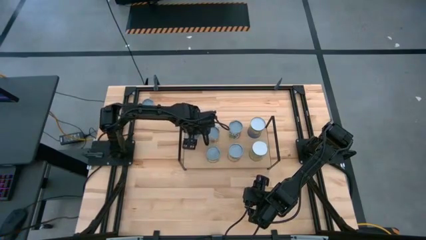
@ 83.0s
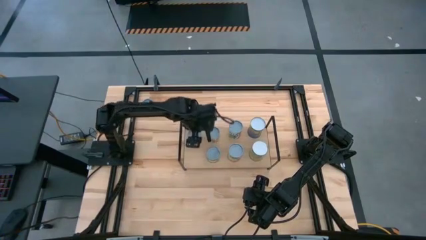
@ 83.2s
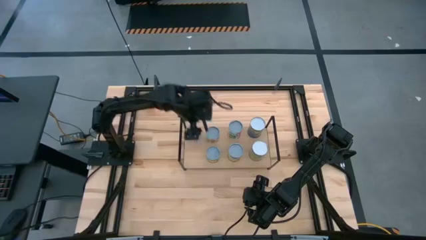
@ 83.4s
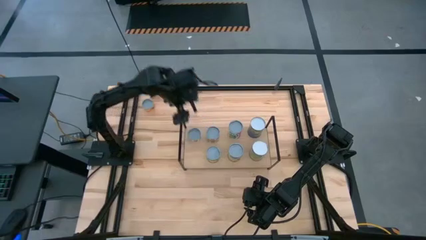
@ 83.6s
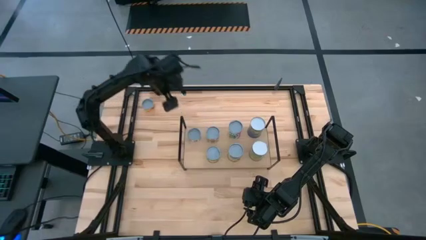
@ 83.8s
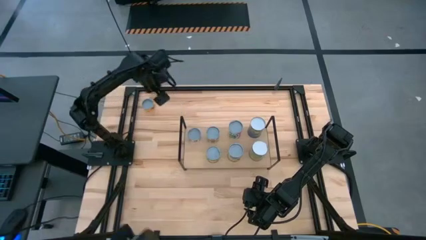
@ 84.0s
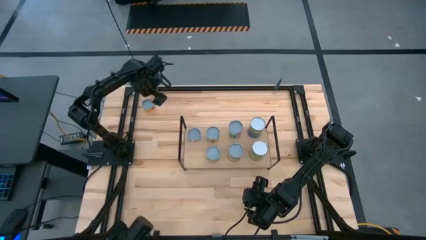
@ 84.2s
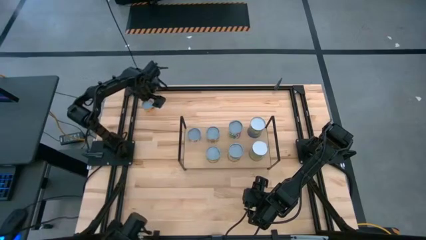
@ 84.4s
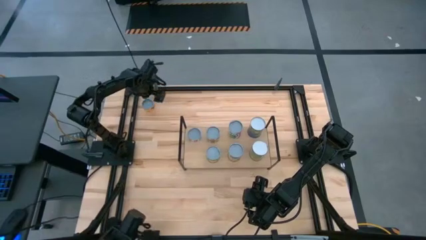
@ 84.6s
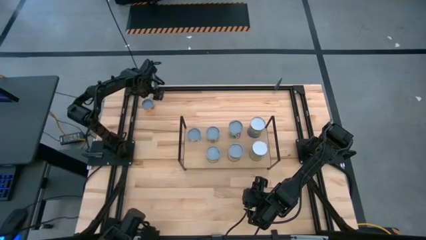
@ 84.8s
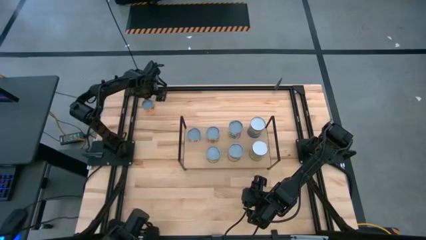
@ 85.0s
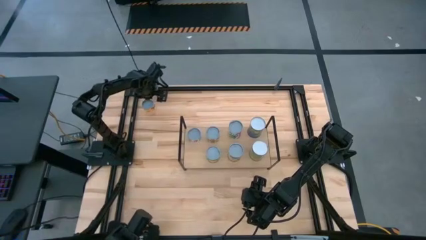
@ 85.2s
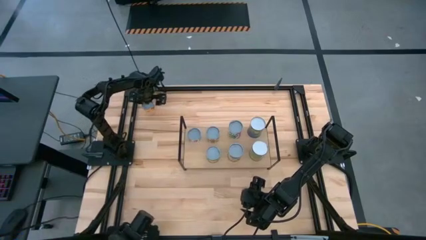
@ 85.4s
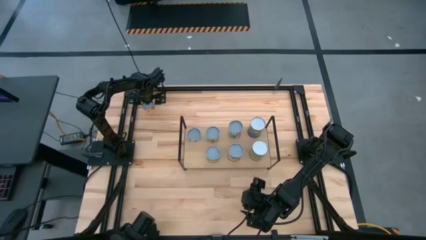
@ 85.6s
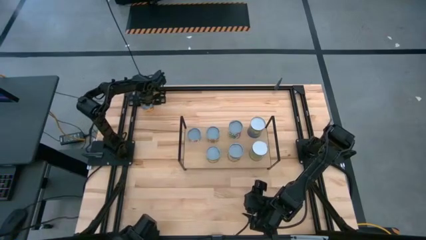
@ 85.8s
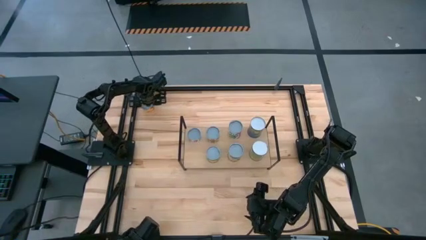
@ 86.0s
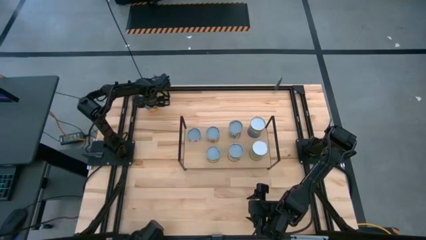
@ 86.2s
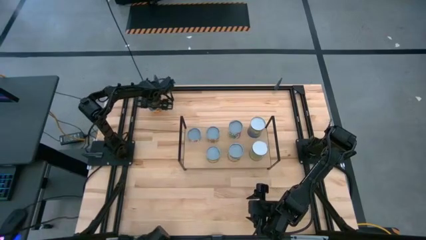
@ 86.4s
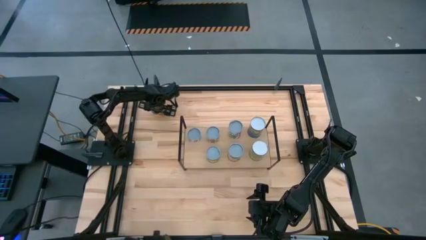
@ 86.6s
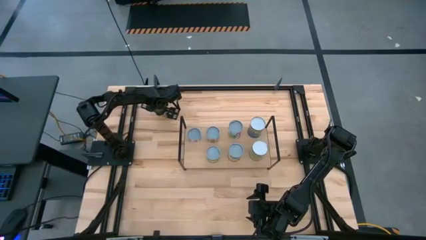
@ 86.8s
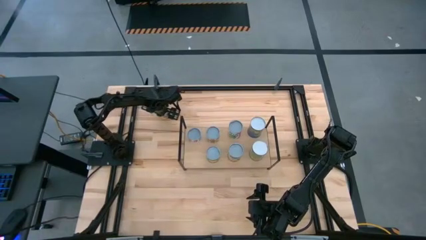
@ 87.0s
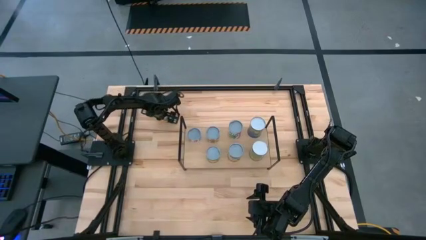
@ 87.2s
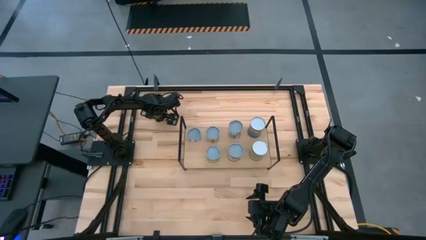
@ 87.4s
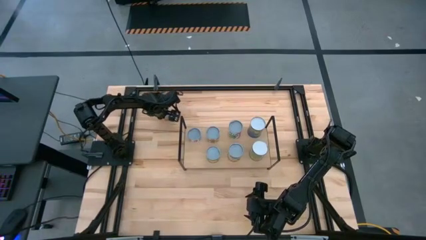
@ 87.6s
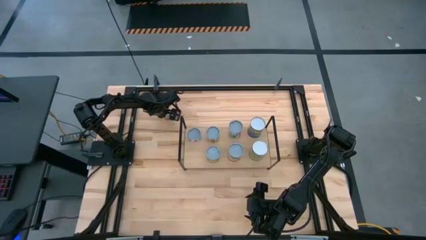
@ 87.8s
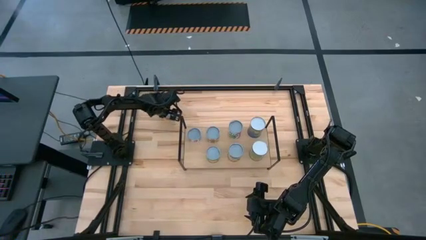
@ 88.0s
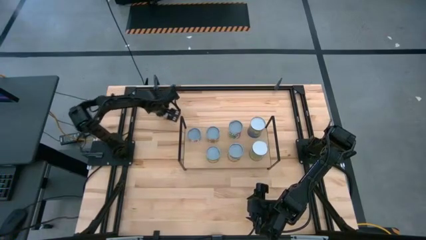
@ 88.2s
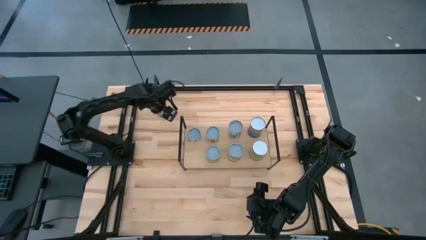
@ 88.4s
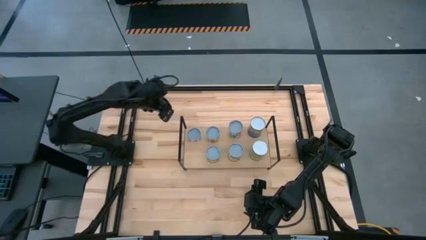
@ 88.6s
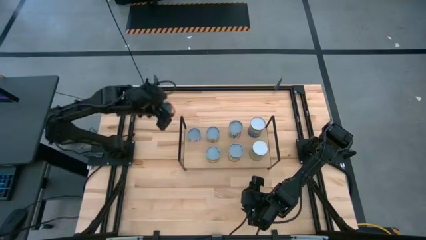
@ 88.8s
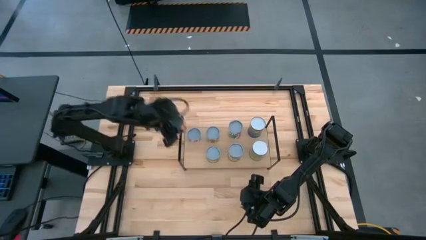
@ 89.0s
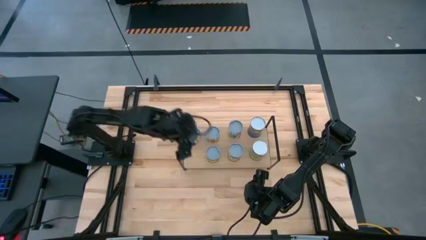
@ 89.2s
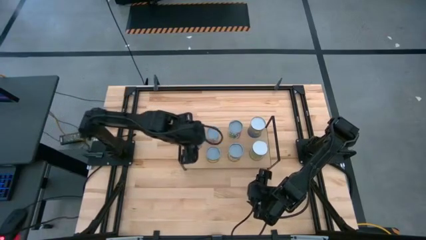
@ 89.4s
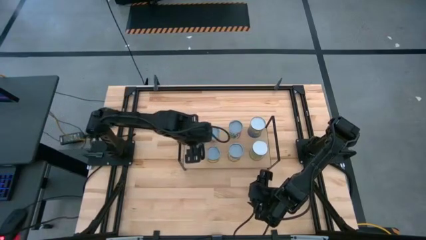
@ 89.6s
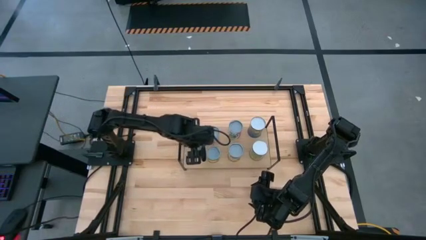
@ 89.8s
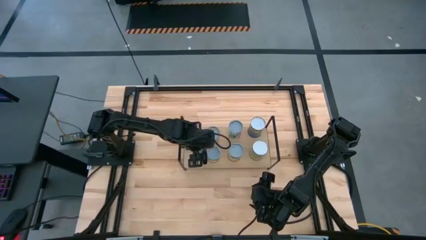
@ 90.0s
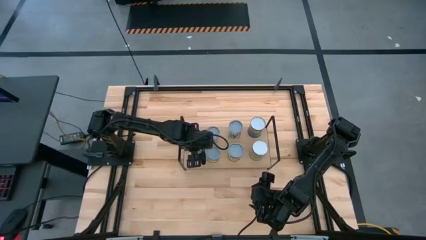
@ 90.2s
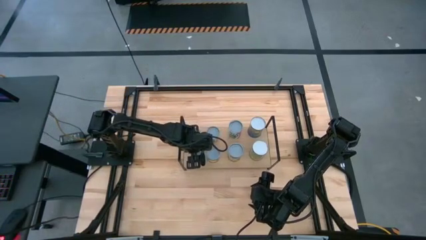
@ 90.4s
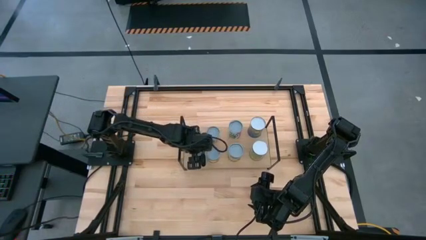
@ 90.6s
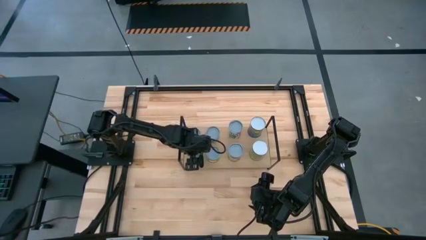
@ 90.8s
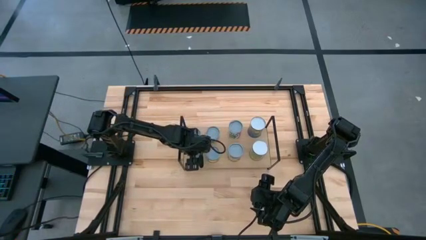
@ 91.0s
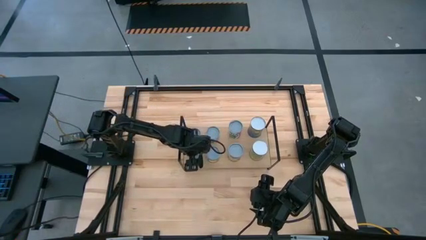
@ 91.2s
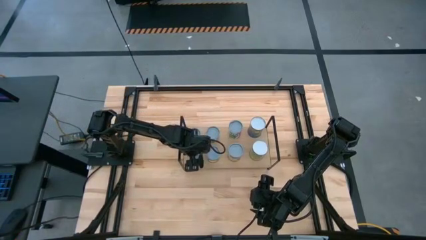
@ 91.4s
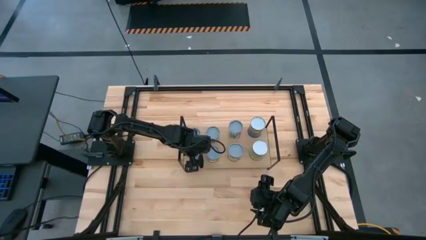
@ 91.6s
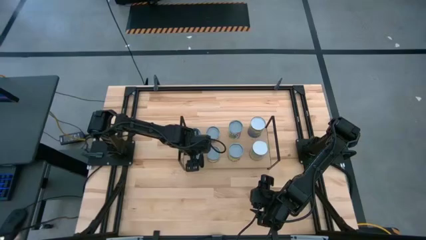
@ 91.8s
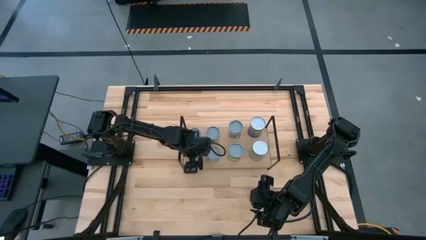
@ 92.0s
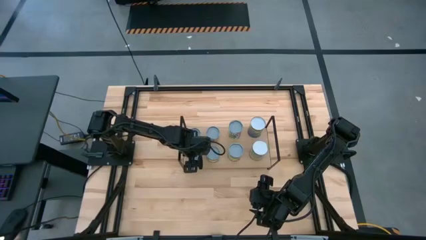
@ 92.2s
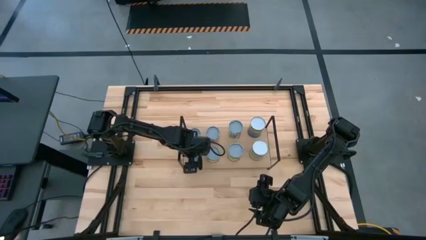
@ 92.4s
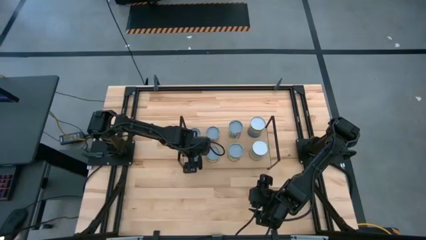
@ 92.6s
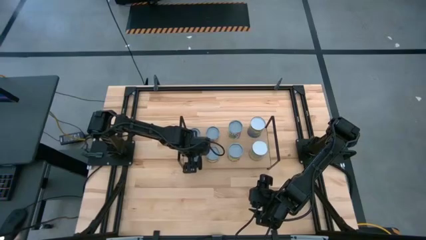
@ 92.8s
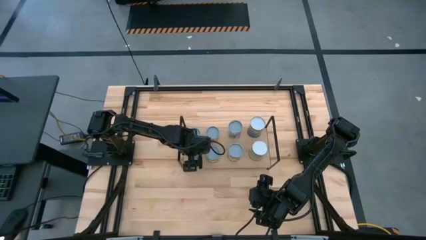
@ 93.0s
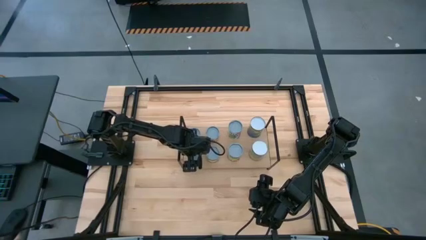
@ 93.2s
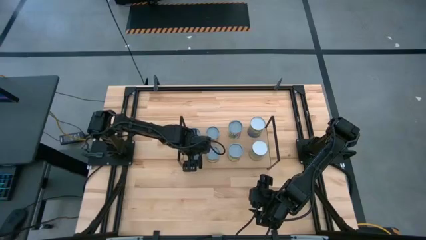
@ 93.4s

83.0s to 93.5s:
Task: Pick and place cans onto a shelf
Put the canned pineapple rings can on the shelf

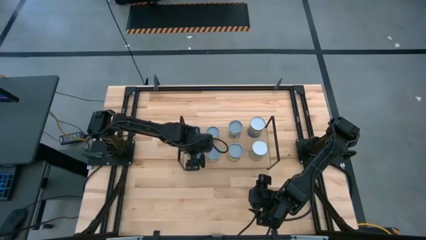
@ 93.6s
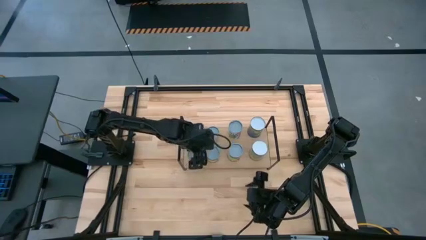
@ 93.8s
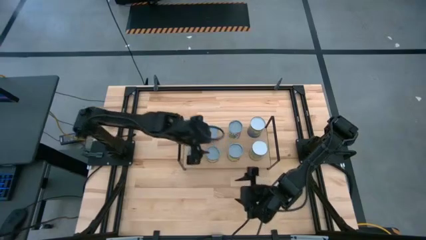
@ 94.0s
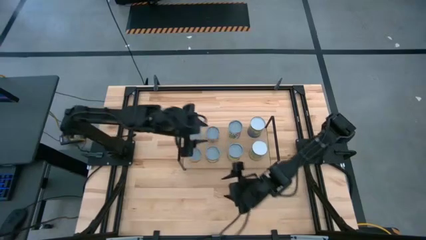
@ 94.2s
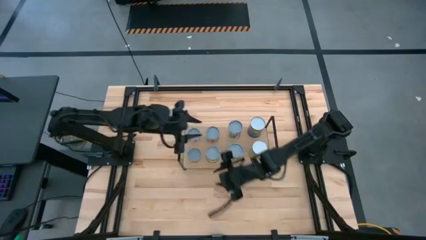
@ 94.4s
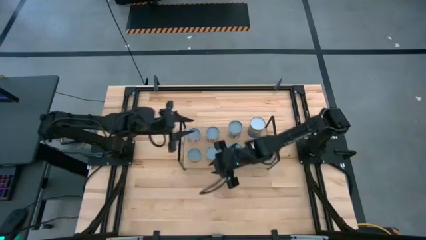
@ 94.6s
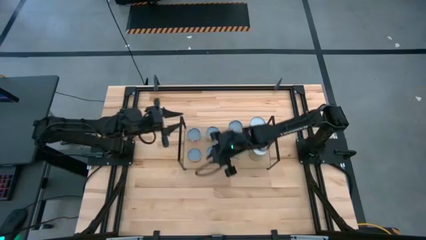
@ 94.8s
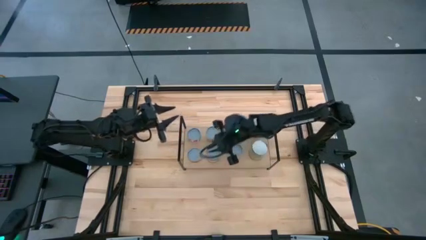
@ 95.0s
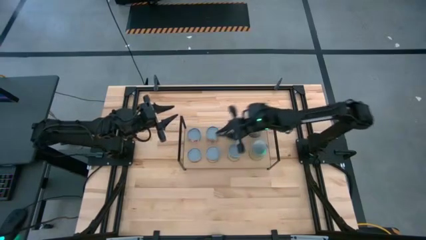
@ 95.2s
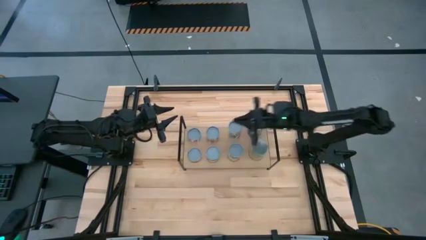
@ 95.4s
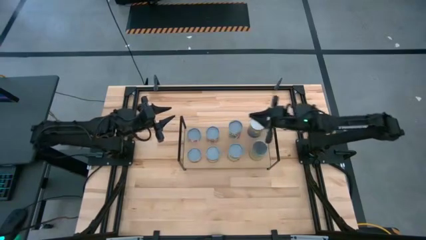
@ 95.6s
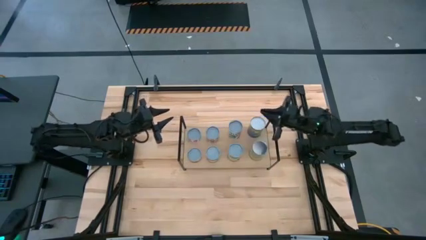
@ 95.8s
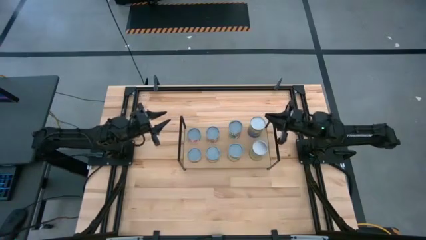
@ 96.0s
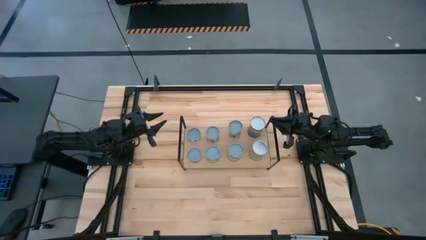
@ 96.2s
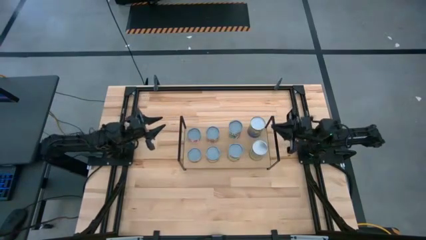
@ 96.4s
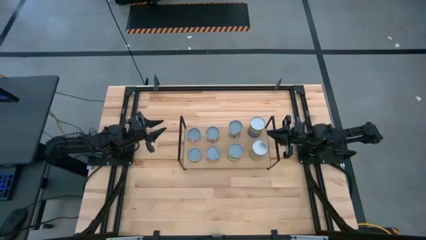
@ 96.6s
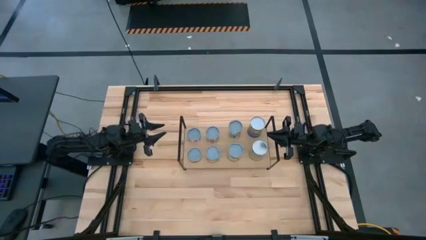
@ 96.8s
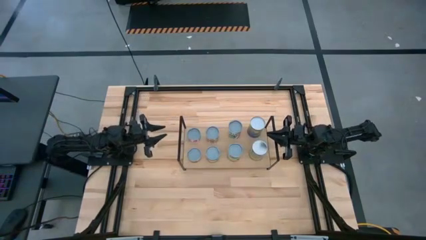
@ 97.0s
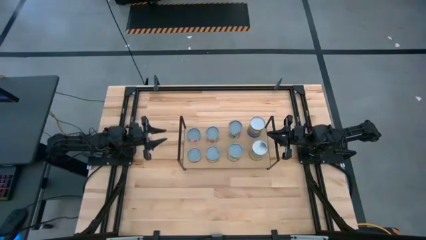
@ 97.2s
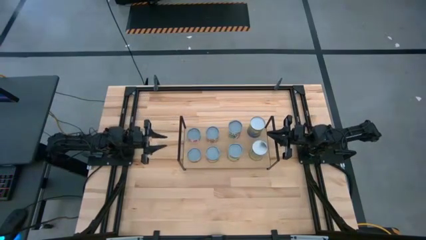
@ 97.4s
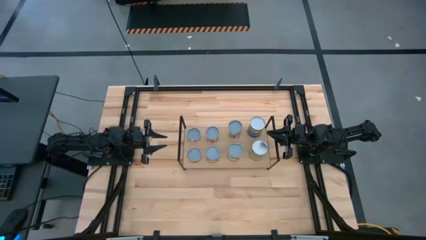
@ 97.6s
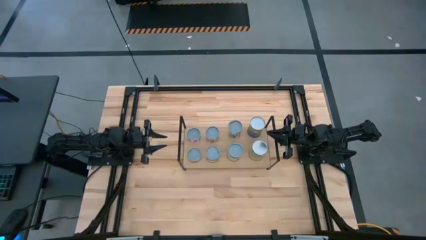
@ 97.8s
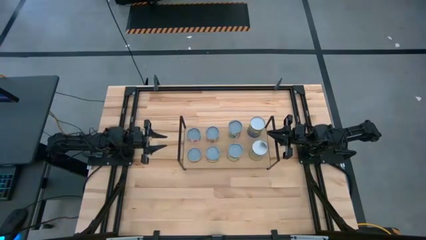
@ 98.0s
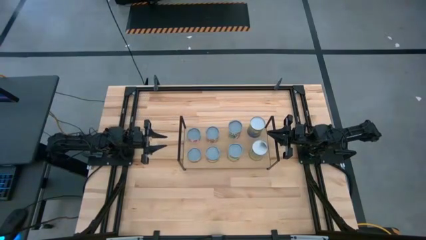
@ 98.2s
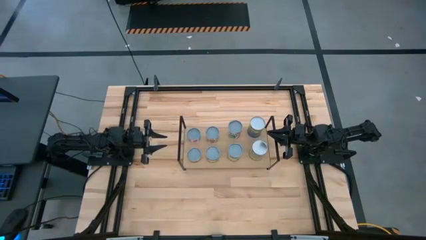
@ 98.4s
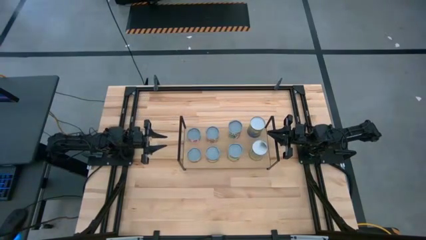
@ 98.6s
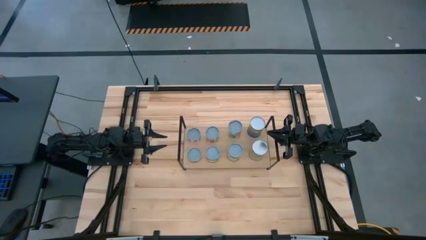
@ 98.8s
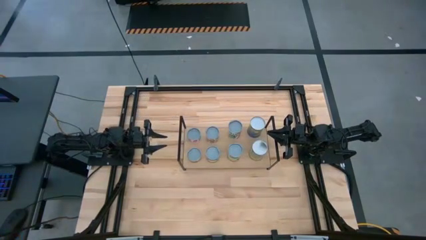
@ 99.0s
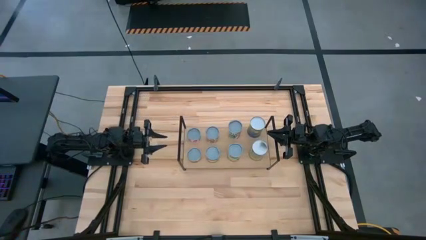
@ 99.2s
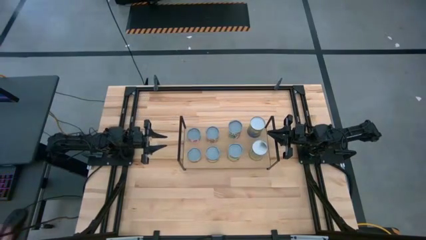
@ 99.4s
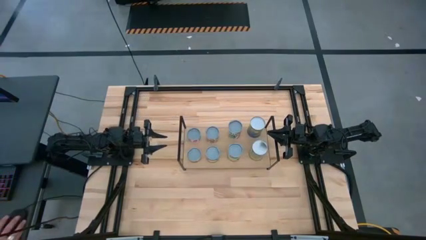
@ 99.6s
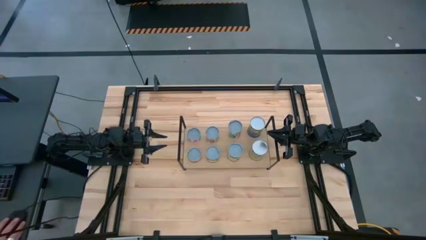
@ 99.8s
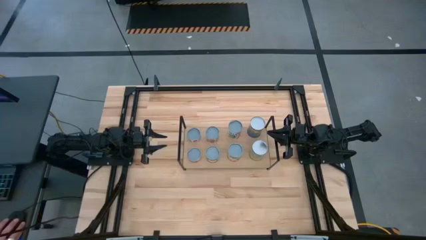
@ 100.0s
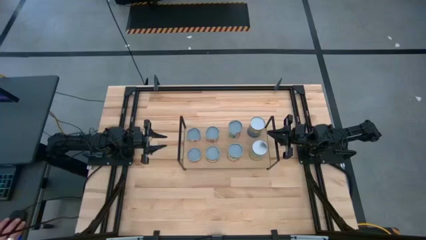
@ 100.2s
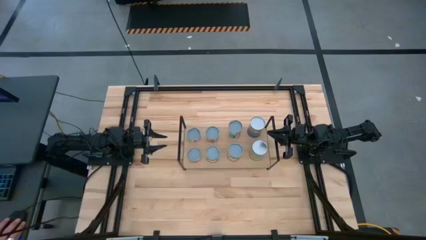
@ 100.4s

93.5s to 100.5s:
Return to Home Position
